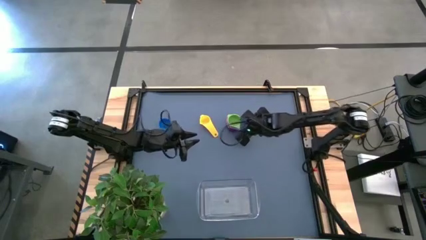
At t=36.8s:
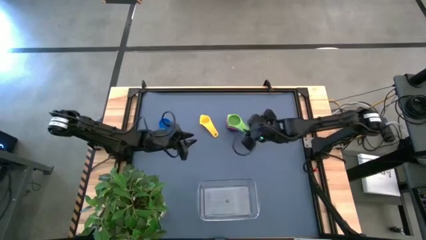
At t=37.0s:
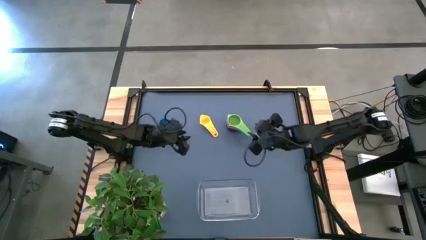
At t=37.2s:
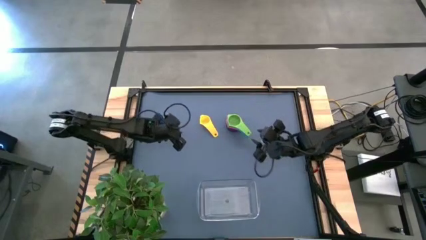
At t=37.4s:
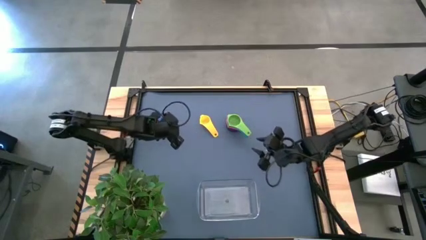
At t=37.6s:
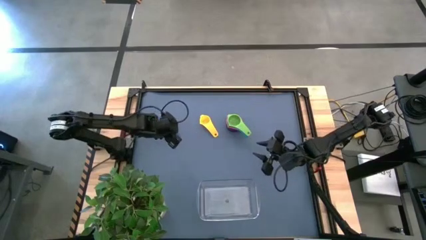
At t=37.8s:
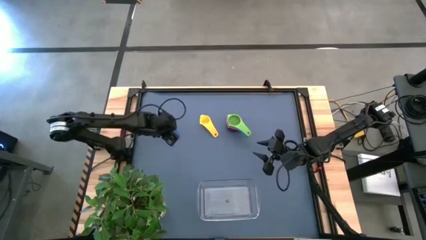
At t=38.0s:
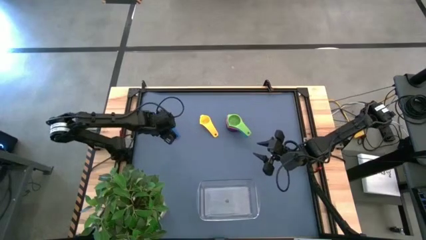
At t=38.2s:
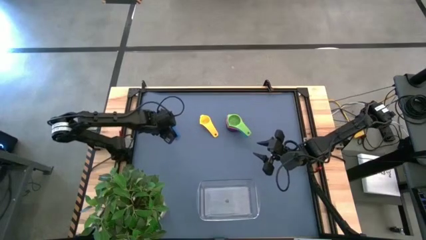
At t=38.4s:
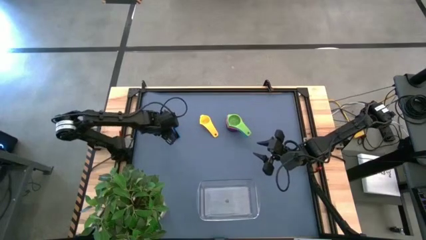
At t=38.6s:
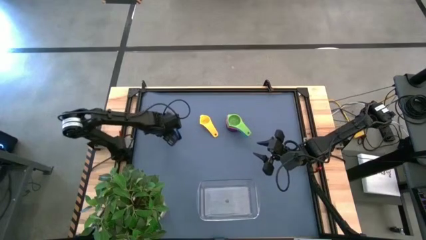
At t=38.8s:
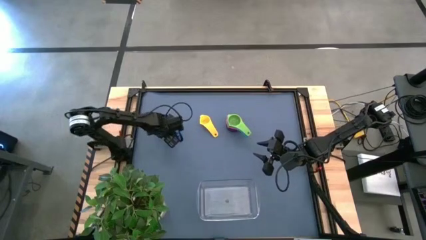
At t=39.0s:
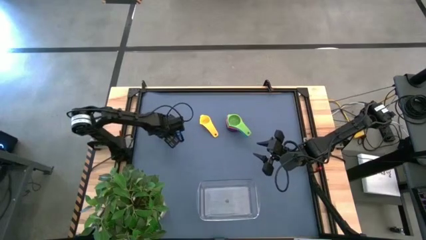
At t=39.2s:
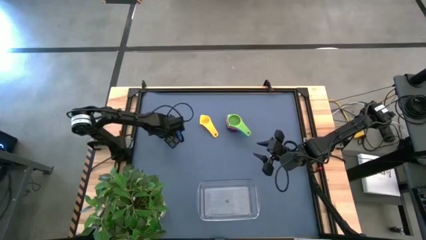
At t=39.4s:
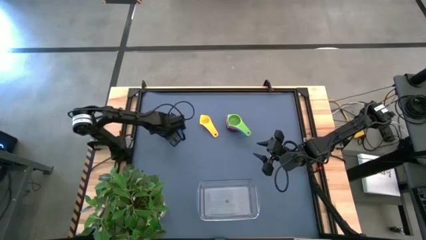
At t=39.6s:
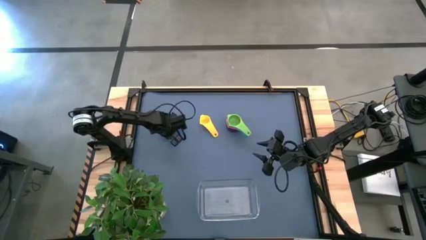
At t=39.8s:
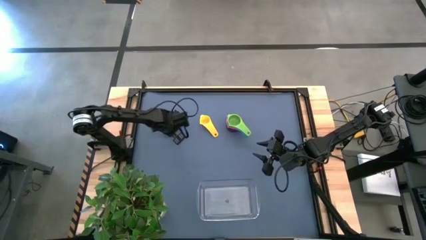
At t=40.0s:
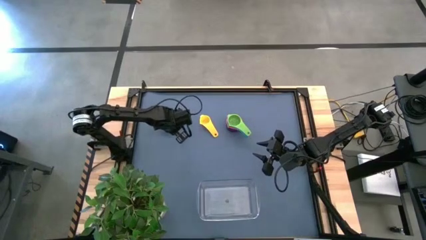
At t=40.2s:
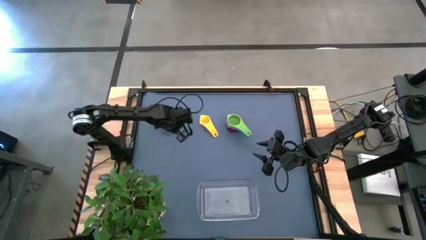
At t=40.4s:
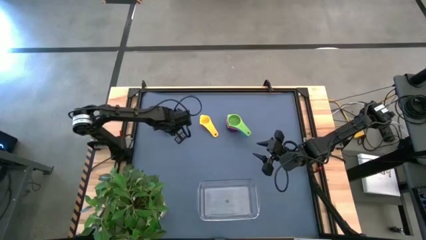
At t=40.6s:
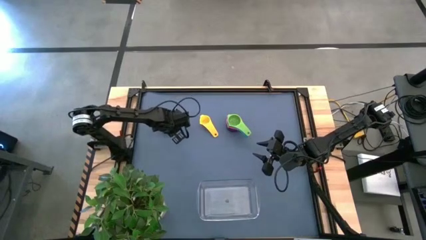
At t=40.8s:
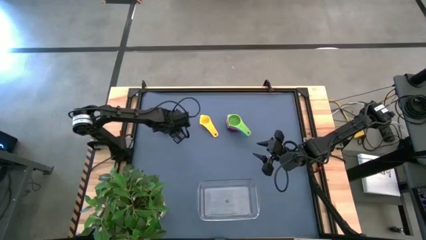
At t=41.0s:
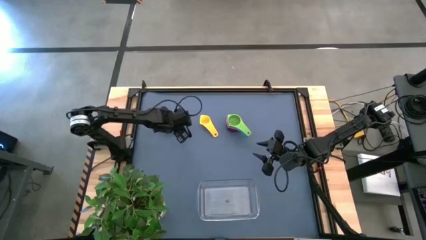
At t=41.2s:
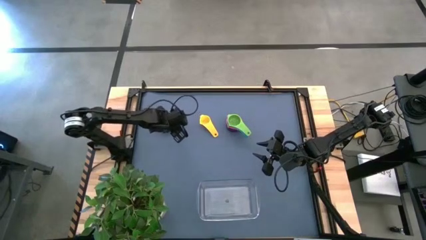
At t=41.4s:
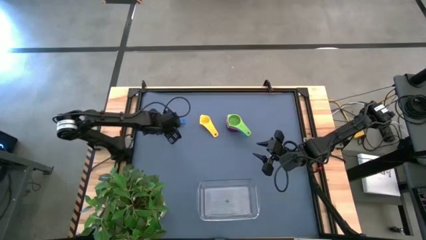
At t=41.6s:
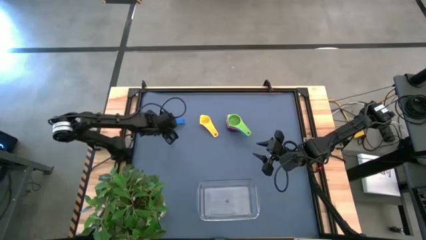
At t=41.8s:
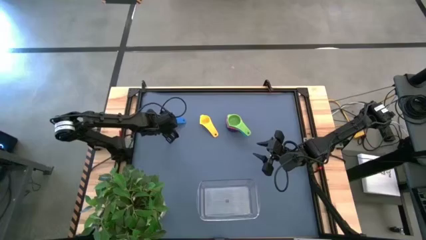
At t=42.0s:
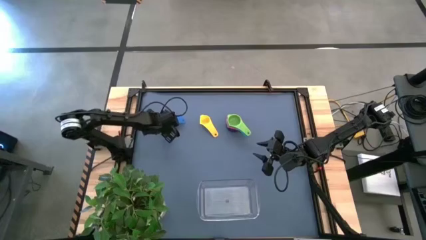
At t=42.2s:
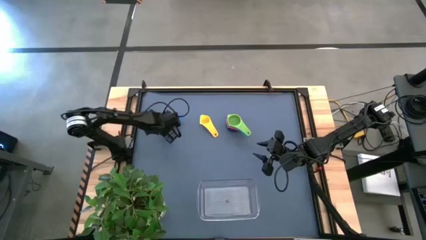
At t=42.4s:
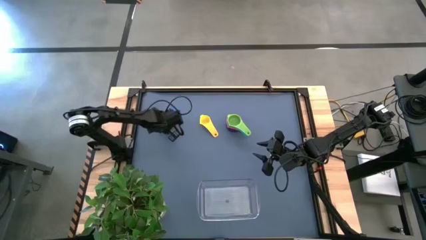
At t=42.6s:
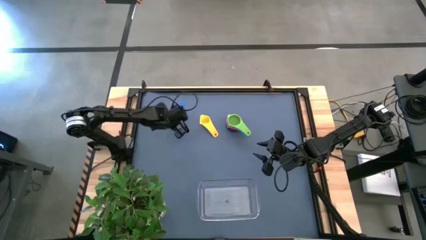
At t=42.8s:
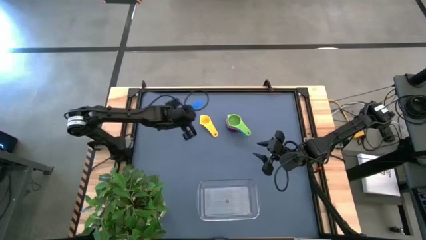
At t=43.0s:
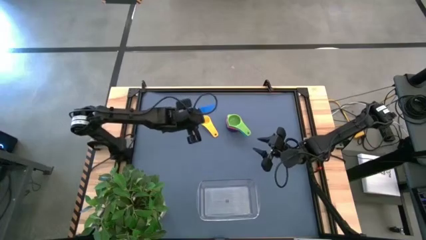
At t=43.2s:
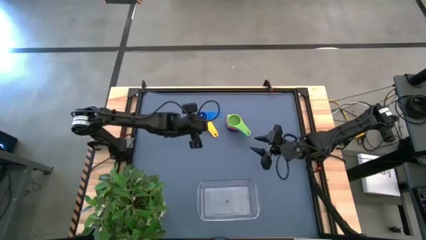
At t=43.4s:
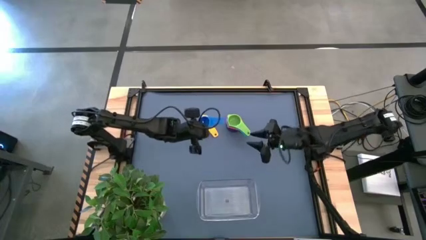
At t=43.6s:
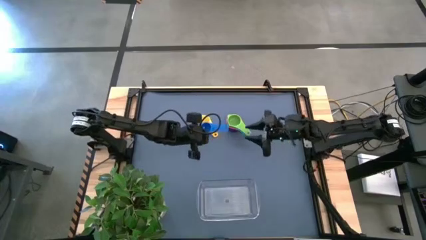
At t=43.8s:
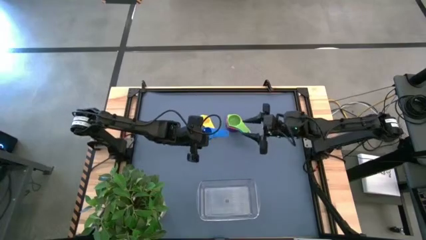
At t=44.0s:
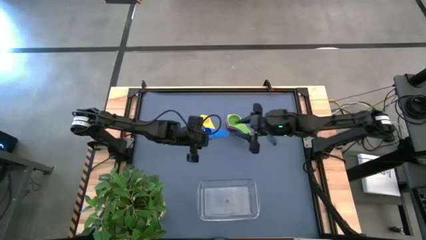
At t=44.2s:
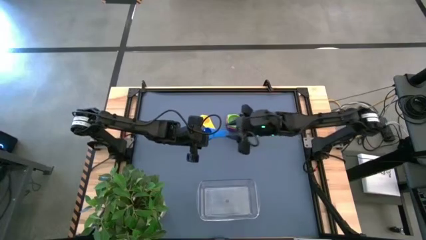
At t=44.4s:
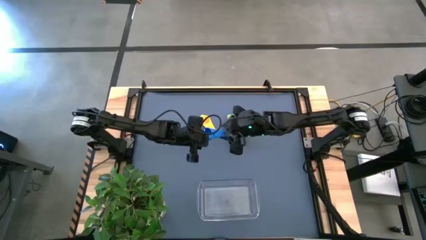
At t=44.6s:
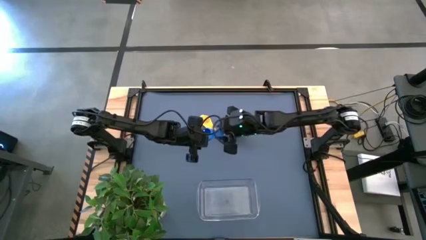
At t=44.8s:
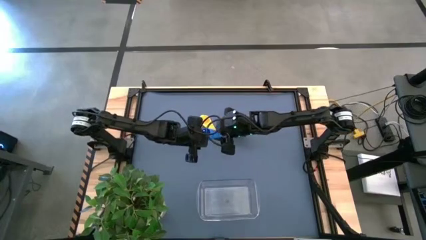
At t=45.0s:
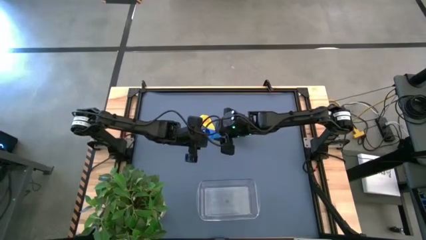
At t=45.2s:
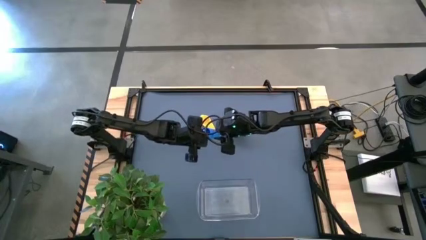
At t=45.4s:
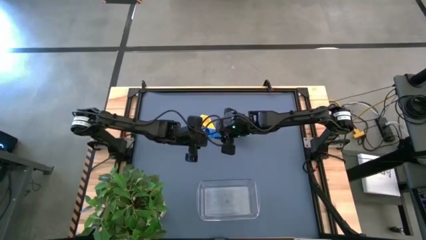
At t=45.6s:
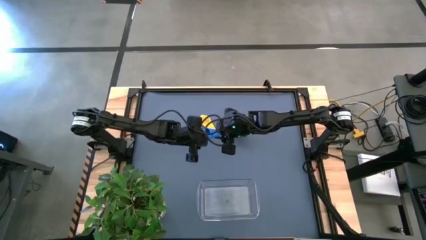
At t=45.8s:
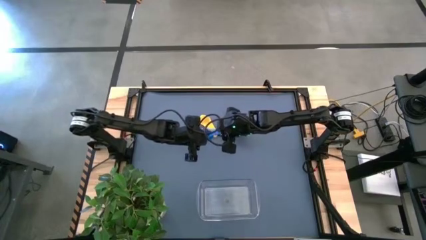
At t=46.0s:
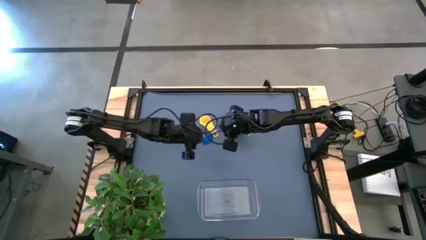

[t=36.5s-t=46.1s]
Task: Nest measuring cups in basket
Stack the blue measuring cup on top of the green measuring cup

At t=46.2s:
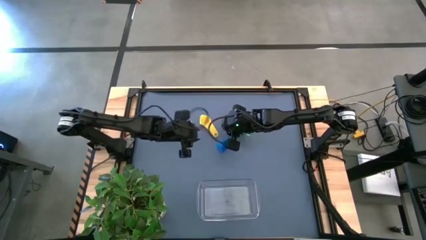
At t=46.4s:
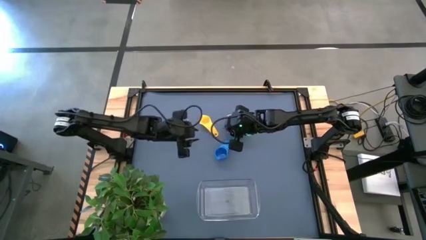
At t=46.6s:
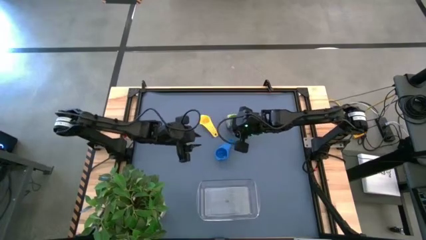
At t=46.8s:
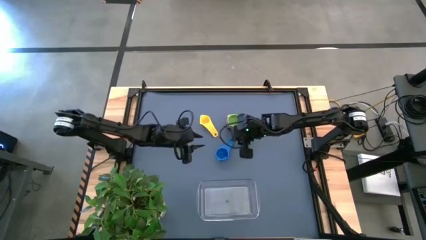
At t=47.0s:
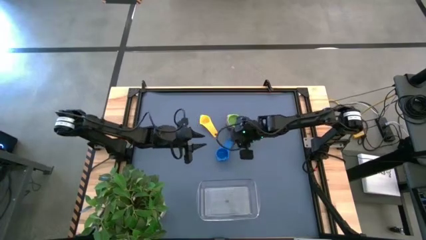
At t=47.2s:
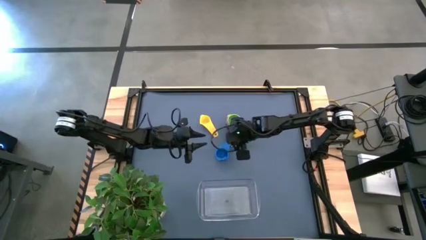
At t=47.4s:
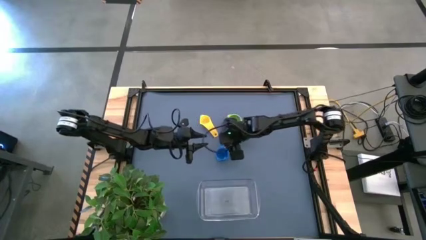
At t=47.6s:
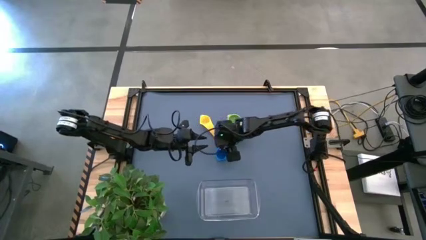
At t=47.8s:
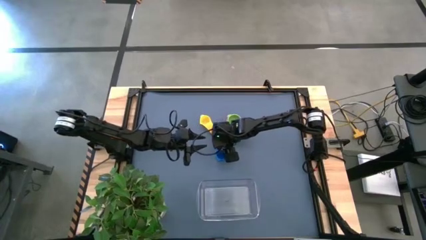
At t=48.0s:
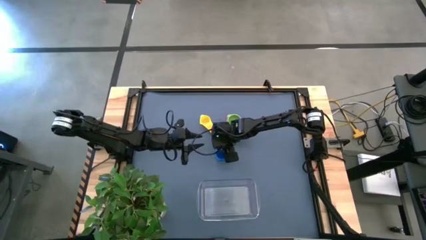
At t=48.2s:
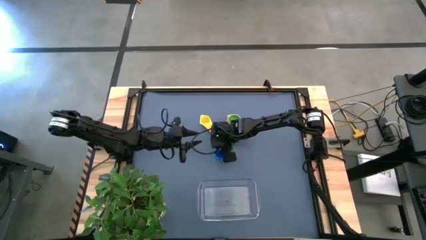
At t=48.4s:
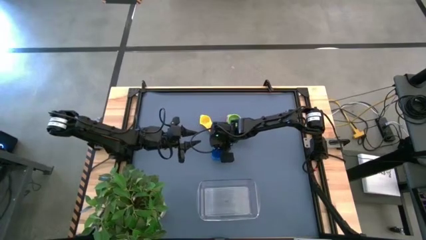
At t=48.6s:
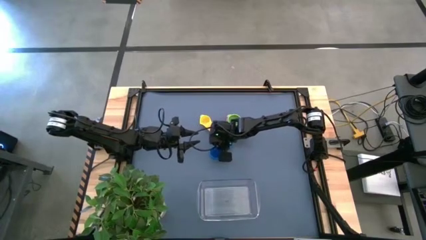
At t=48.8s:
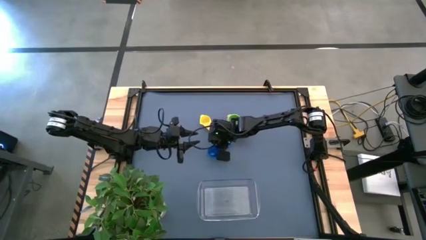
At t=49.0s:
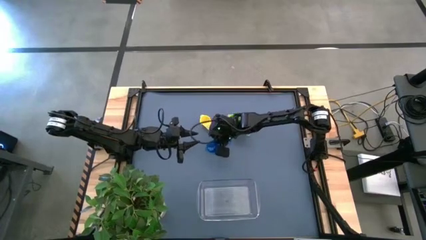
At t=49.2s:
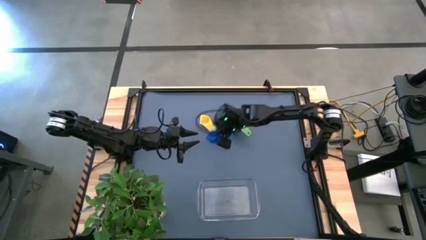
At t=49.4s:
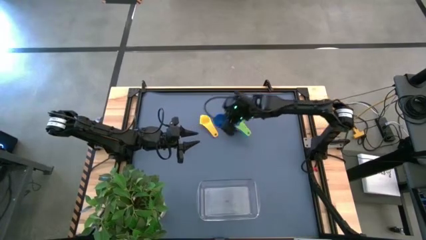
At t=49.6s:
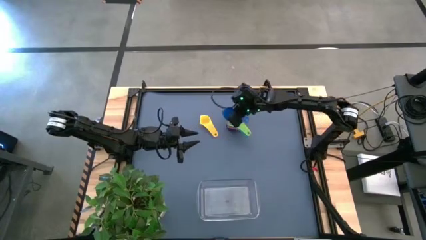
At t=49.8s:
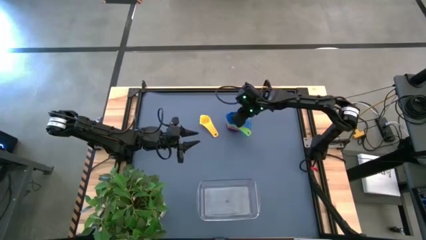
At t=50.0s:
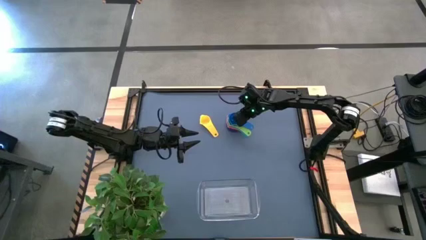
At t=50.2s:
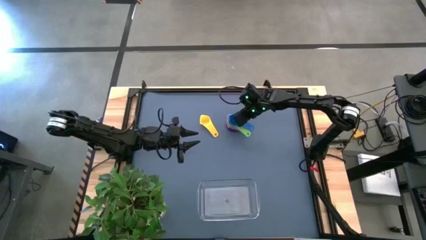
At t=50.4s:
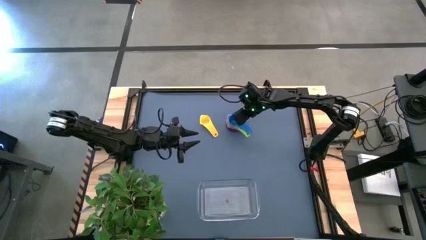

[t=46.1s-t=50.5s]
Stack the blue measuring cup on top of the green measuring cup

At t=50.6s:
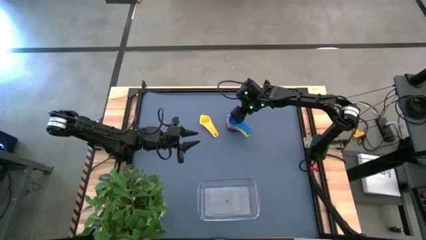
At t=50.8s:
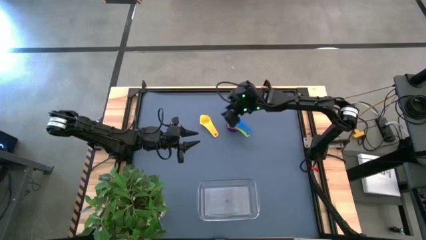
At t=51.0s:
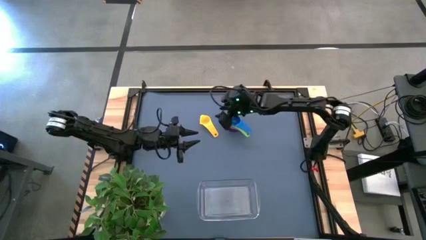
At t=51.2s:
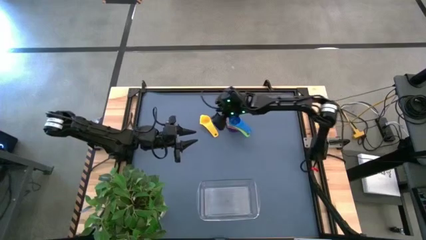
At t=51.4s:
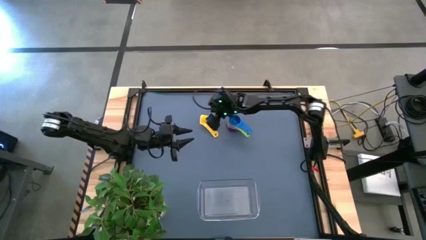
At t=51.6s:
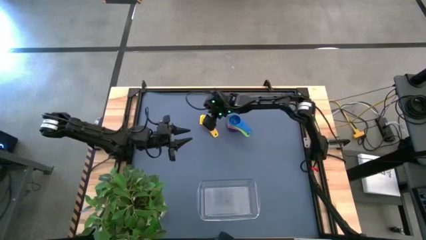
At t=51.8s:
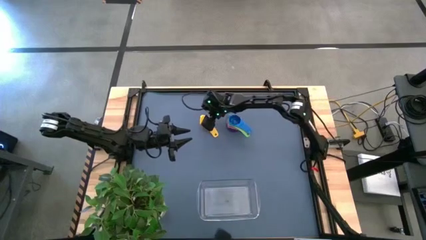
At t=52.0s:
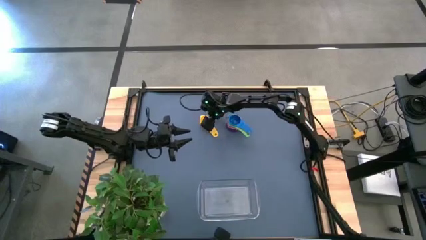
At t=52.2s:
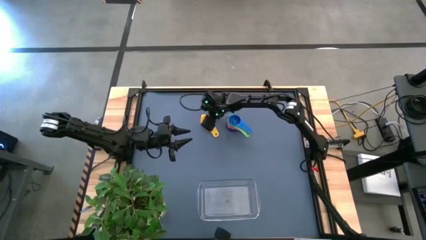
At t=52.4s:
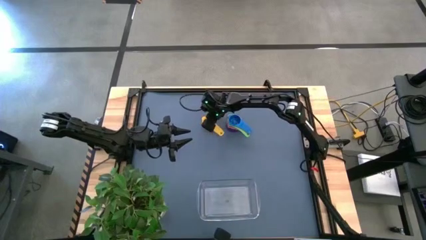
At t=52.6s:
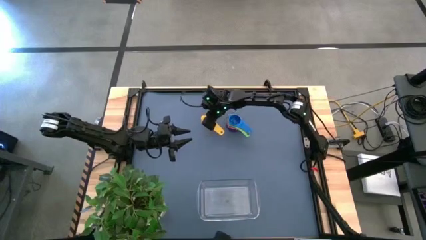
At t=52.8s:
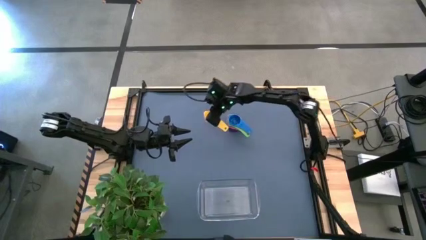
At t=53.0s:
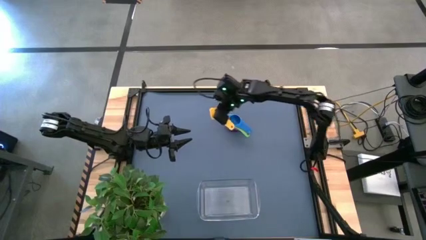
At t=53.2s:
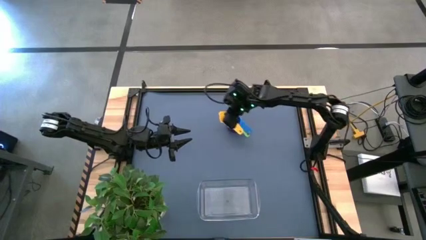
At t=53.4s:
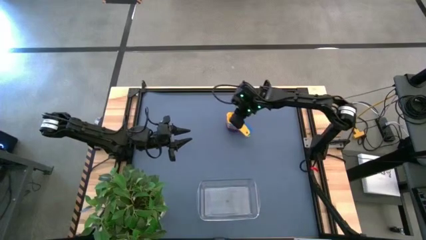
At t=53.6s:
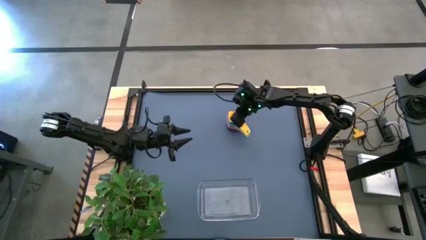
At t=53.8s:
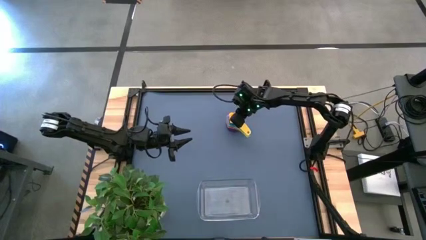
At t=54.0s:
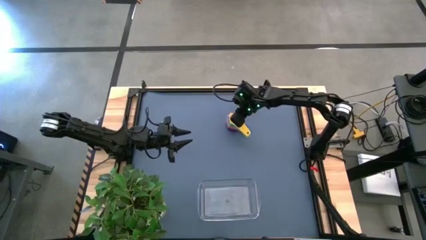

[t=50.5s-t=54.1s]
Stack the yellow measuring cup on top of the blue measuring cup
